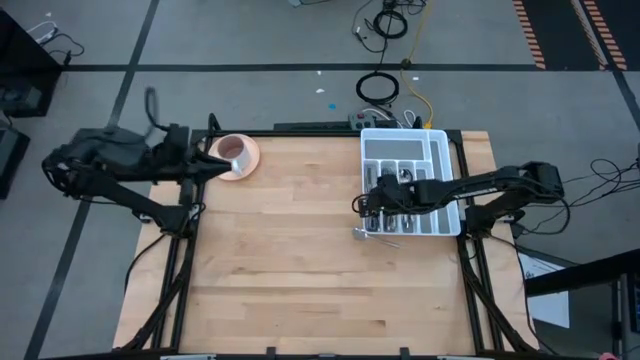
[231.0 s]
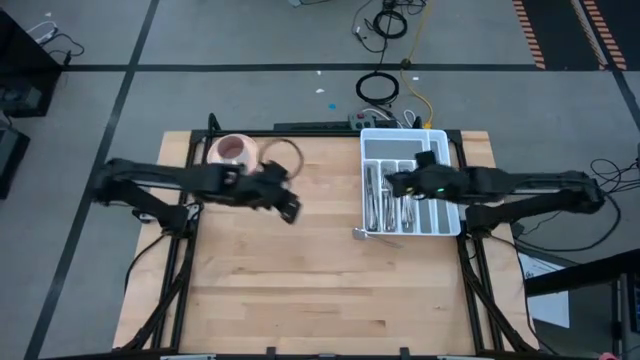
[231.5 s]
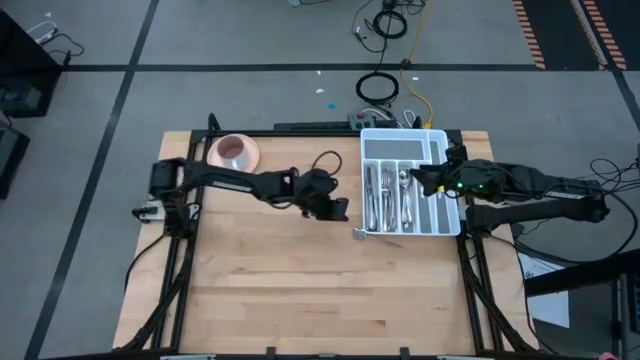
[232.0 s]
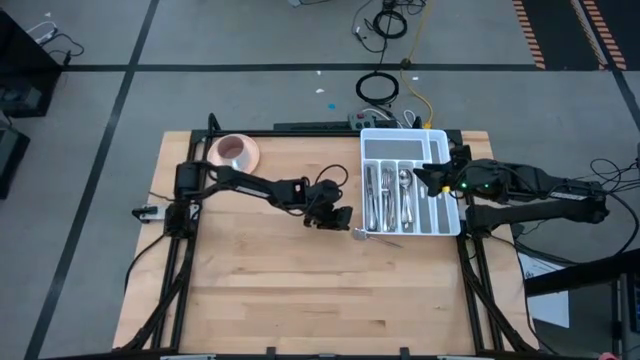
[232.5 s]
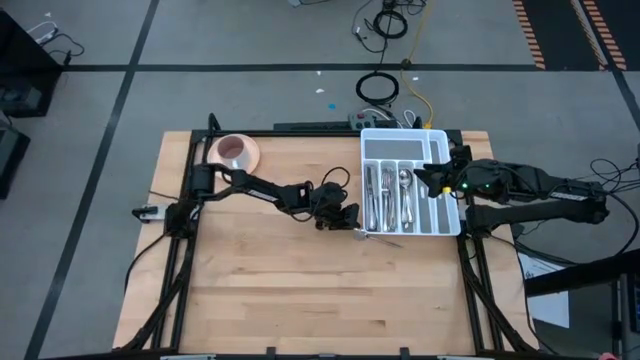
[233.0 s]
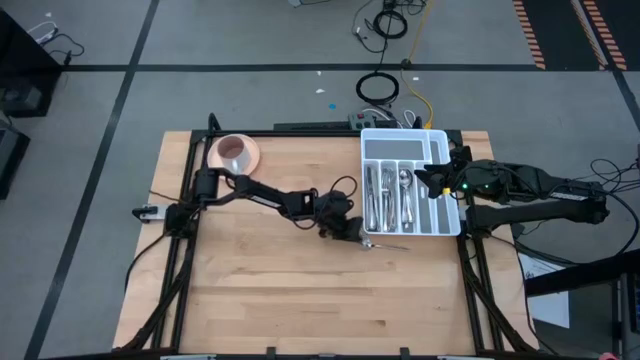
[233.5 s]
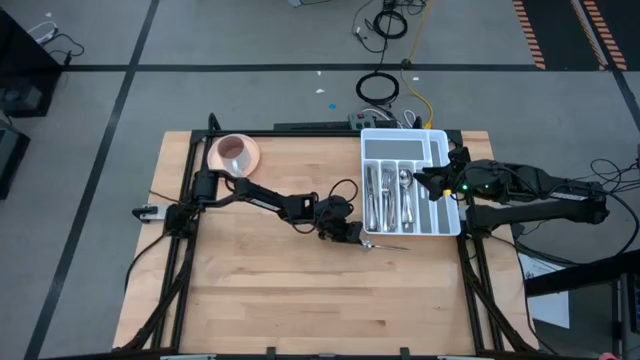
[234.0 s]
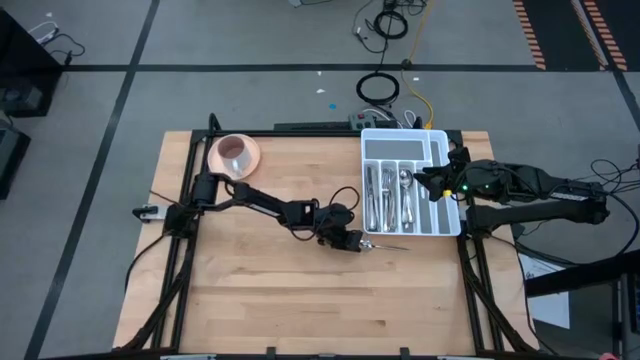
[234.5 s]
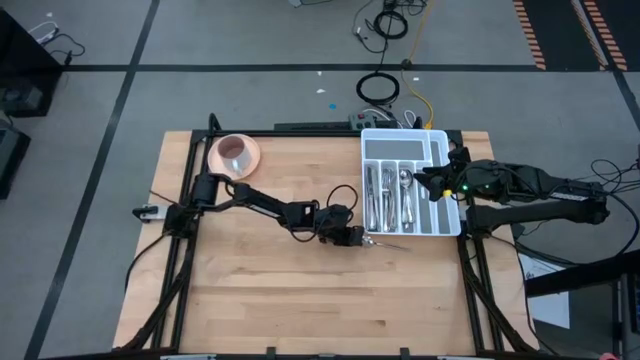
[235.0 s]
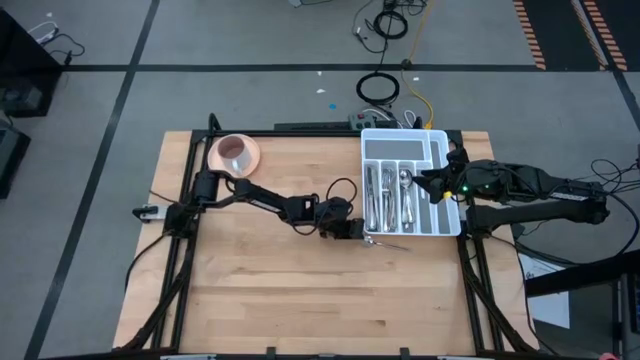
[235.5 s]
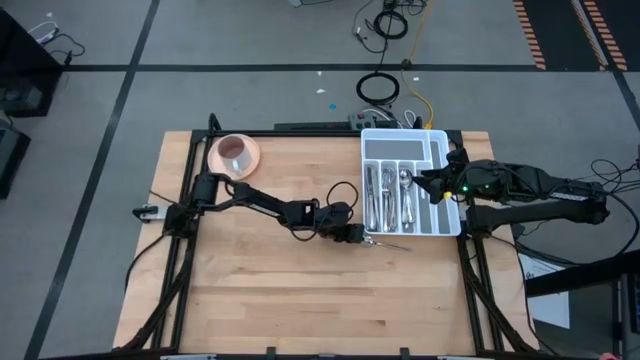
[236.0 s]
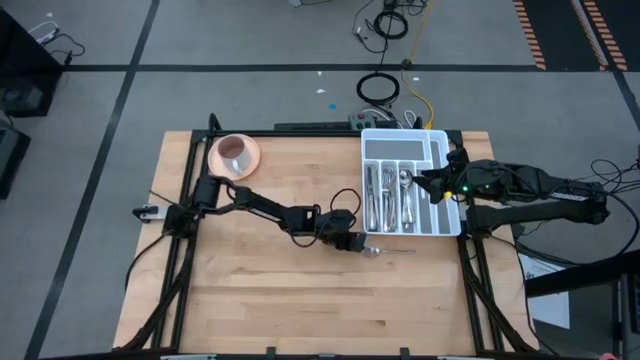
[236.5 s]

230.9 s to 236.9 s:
Task: Sort silverware
Put the silver spoon into the white cutlery tray

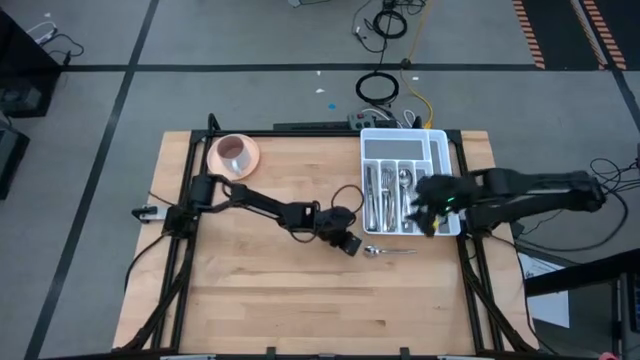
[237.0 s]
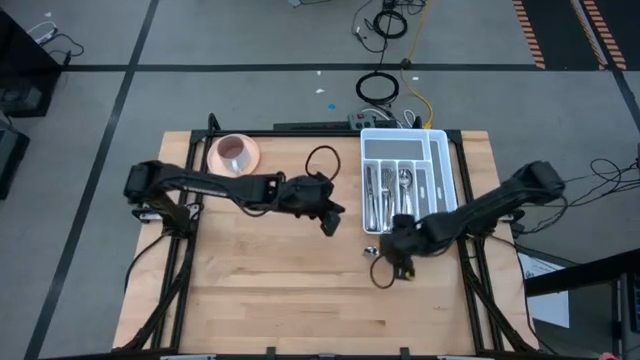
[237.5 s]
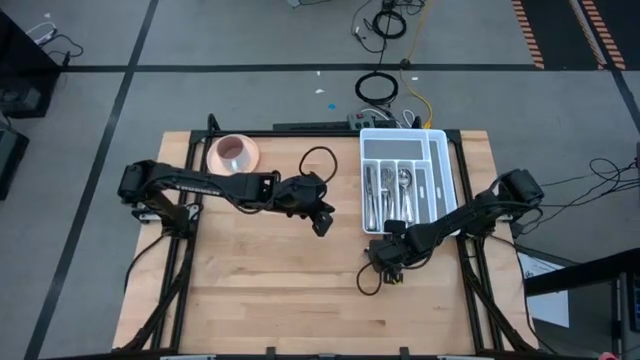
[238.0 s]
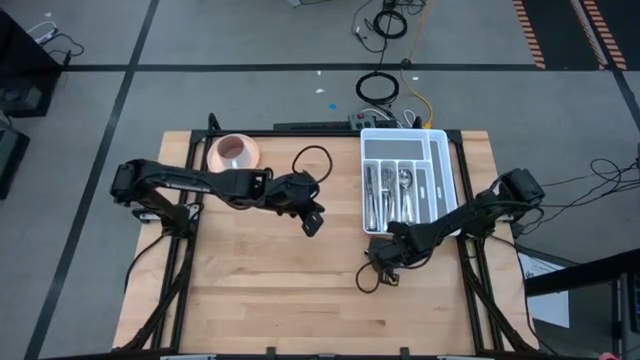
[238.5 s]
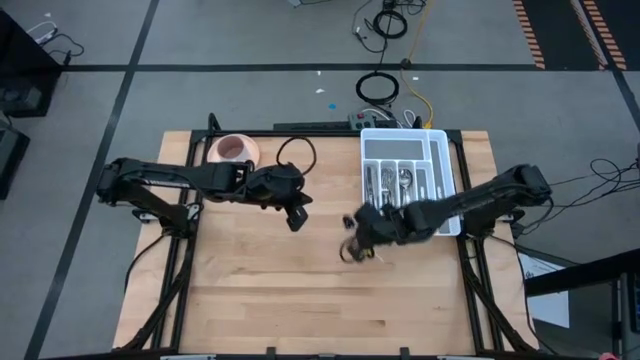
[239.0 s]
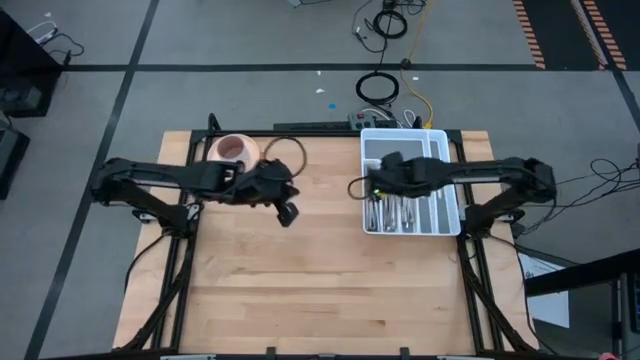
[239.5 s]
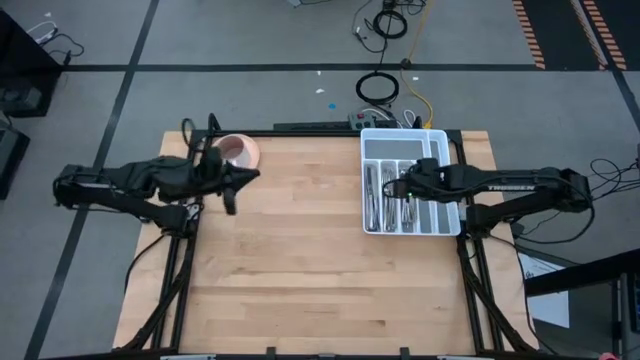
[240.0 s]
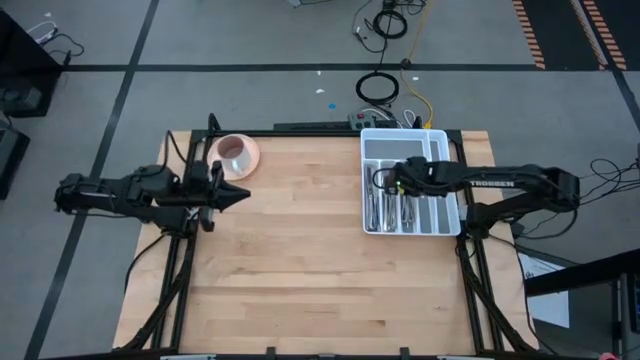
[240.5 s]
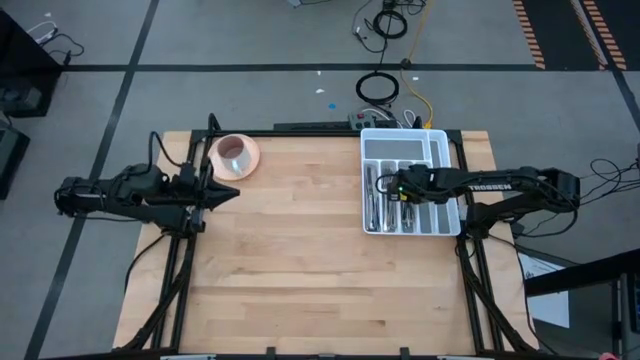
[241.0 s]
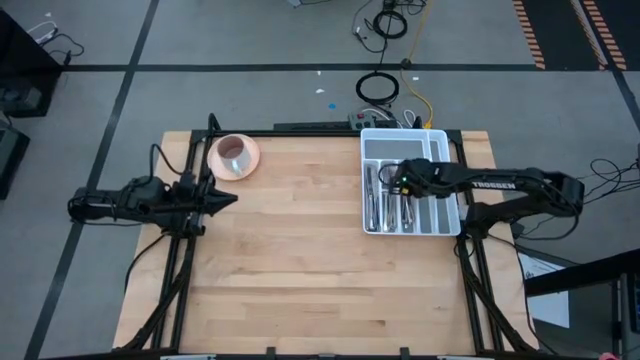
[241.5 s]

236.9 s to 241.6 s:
Put the silver spoon into the white cutlery tray

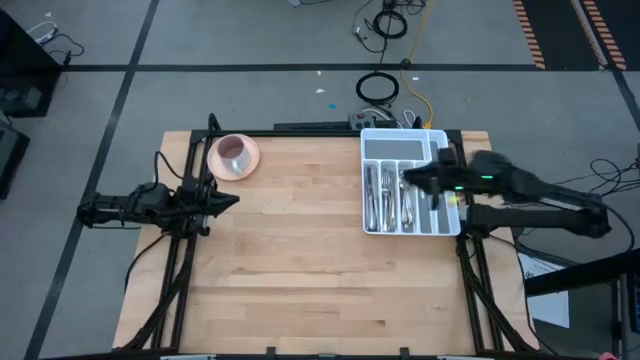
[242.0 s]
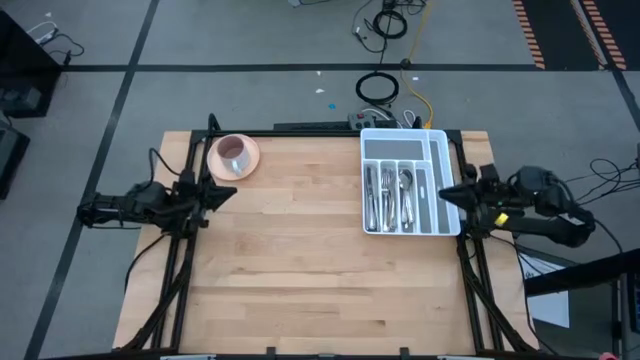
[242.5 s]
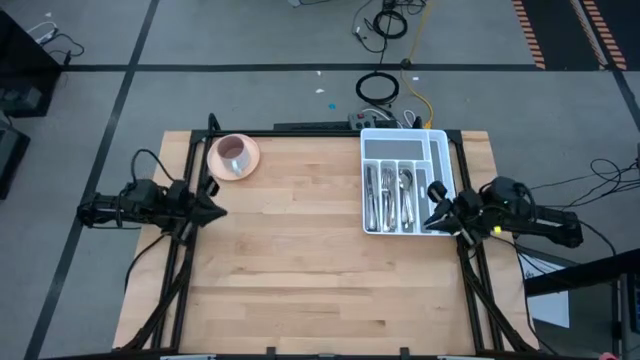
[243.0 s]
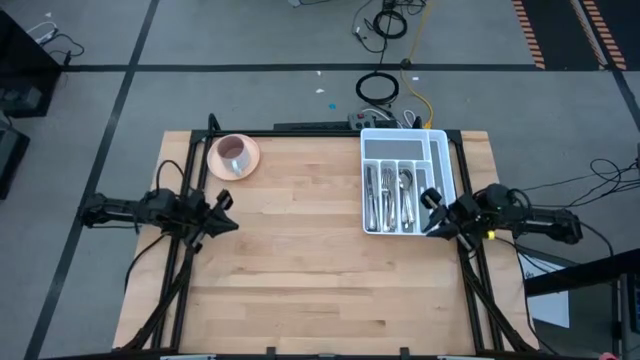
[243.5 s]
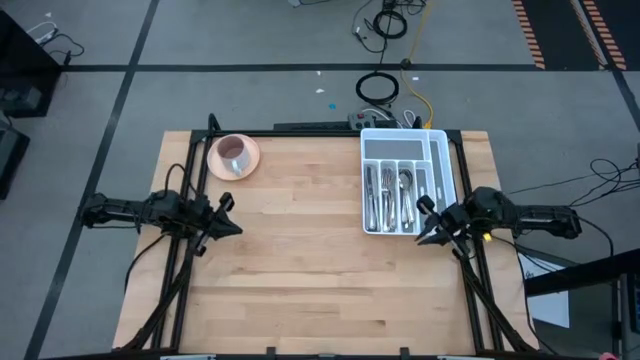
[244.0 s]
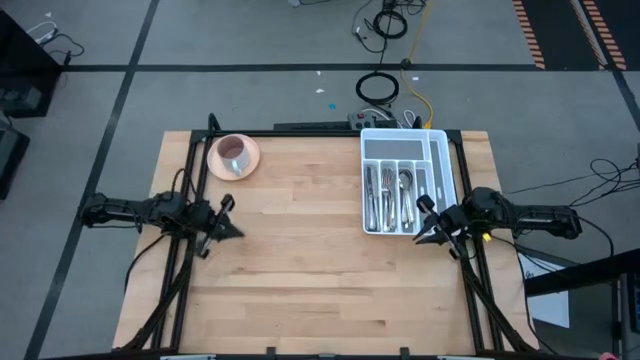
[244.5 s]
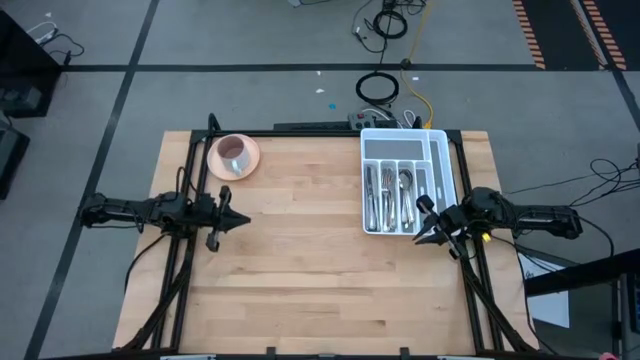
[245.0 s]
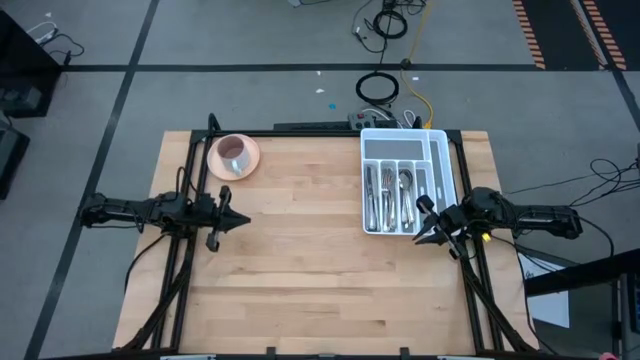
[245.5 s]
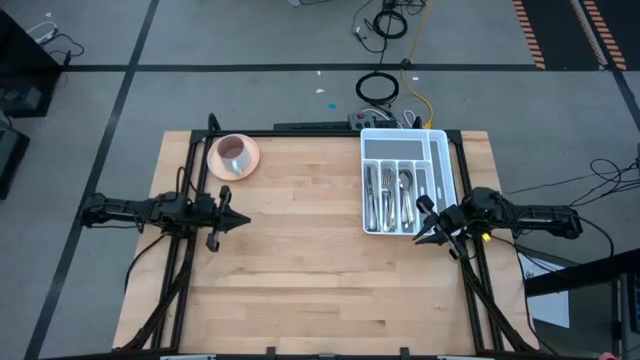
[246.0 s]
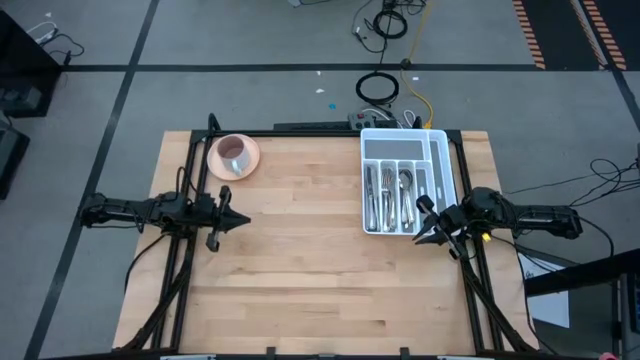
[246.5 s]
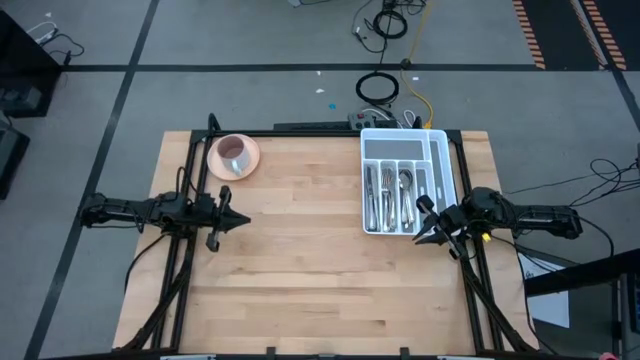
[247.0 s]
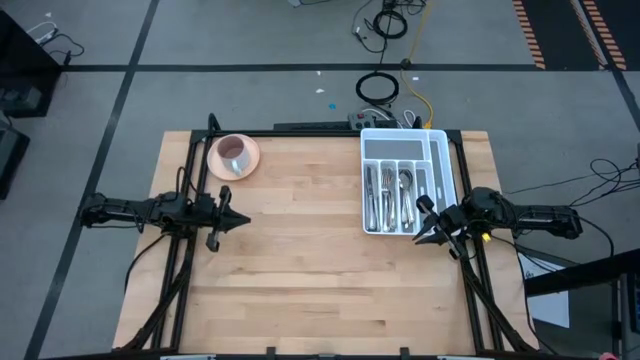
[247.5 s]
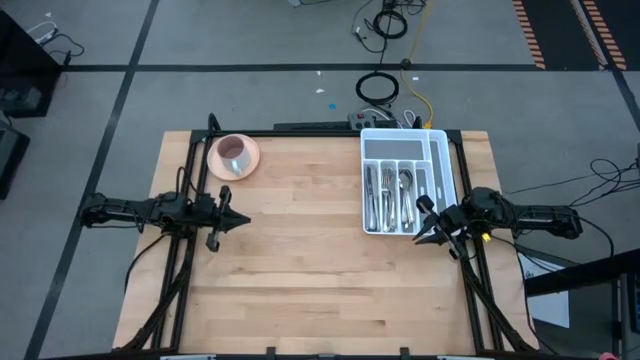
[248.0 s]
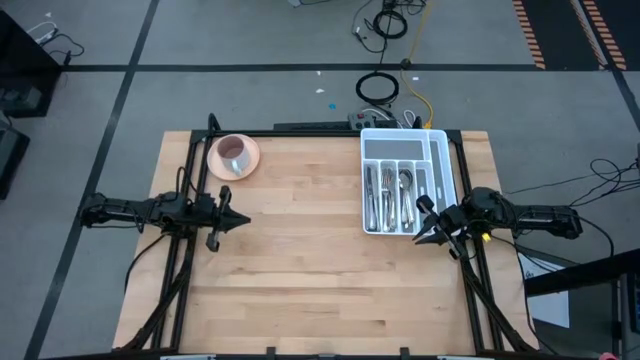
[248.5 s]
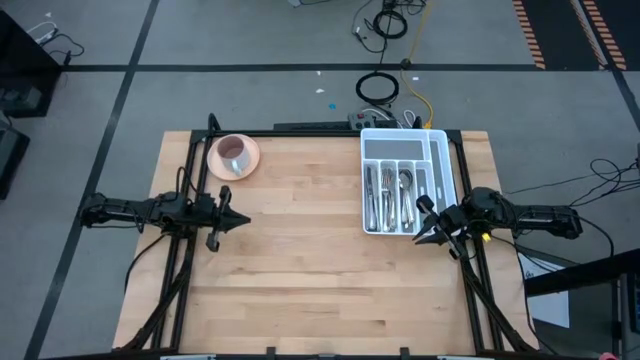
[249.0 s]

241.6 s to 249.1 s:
Return to Home Position

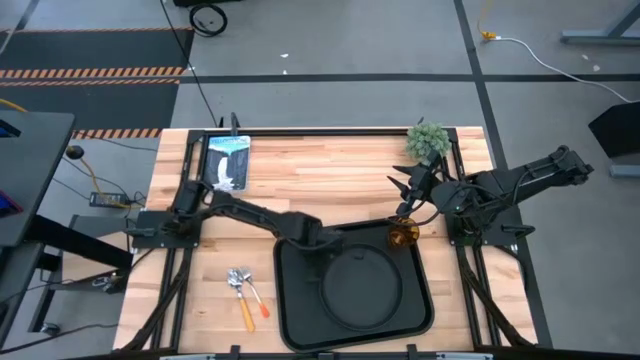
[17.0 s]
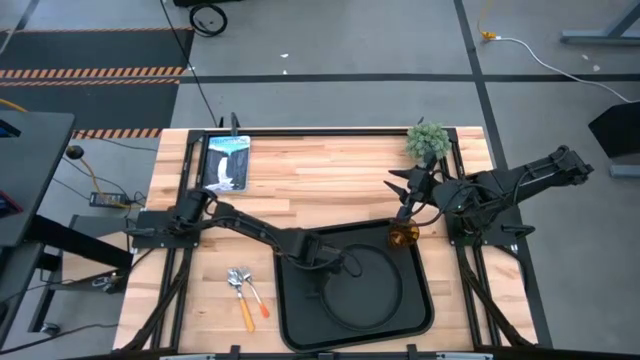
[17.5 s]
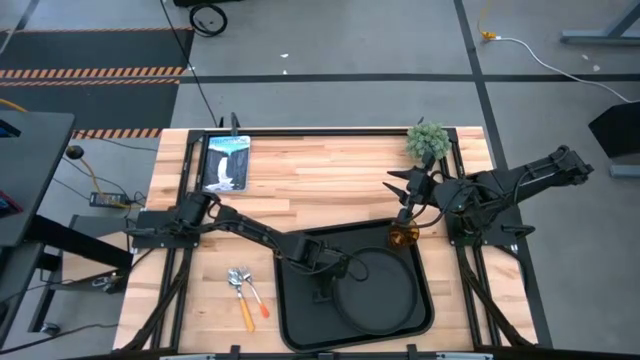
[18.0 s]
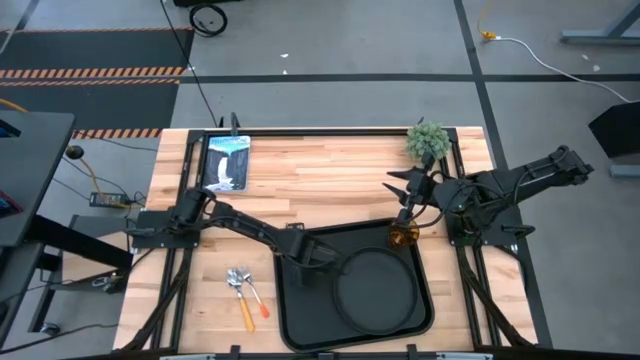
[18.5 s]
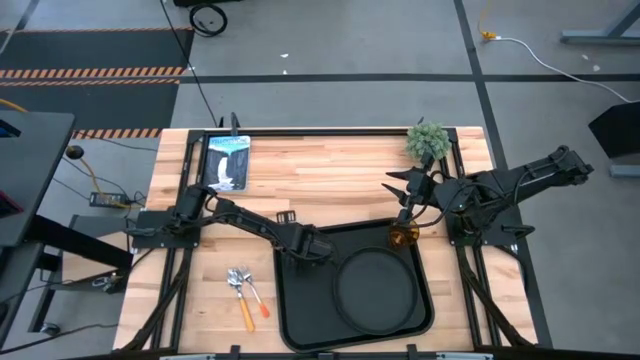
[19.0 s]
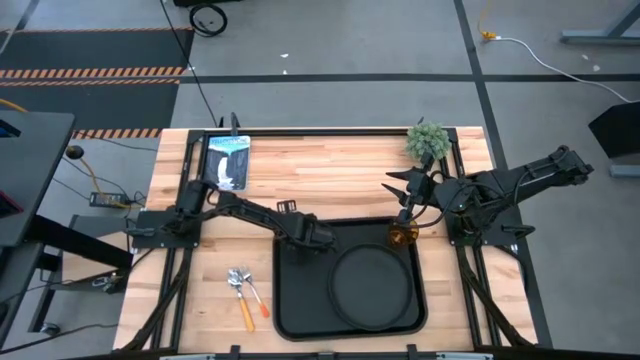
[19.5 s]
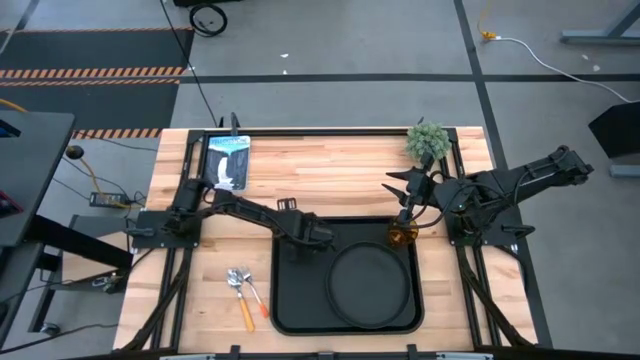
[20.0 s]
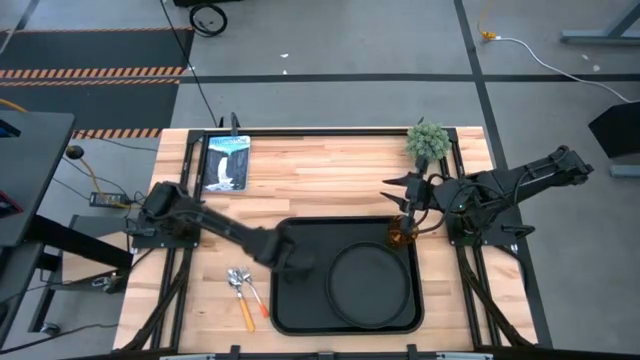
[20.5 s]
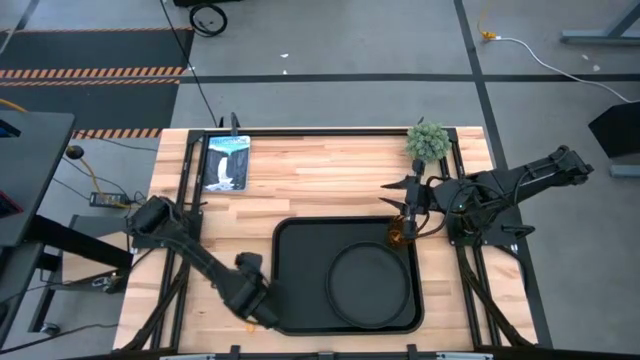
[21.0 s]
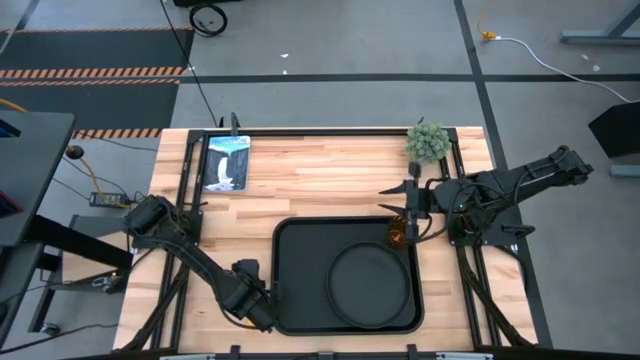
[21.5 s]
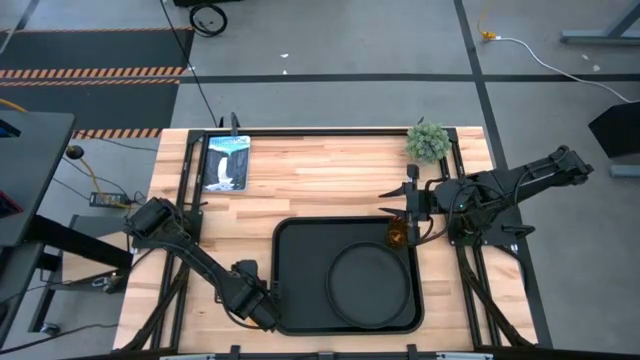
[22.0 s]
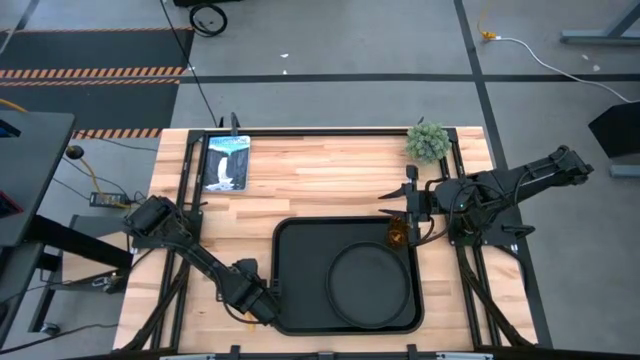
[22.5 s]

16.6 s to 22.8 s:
Task: Pick and place plate/cup/fork/spoon on tray
Adjust the black serving tray
